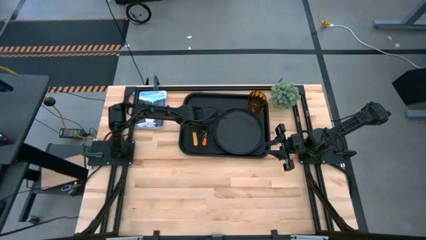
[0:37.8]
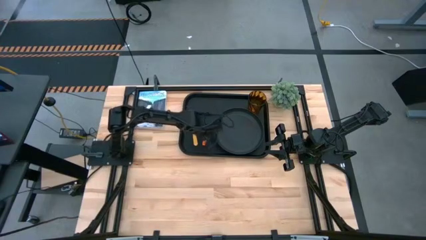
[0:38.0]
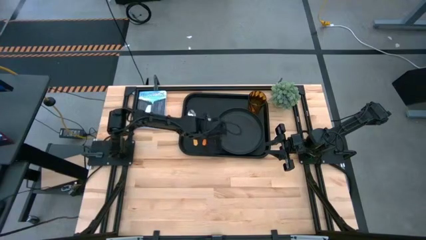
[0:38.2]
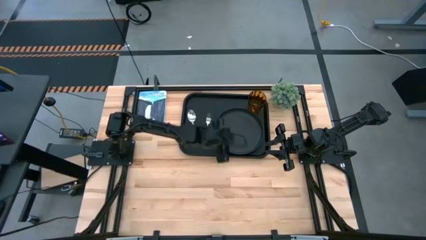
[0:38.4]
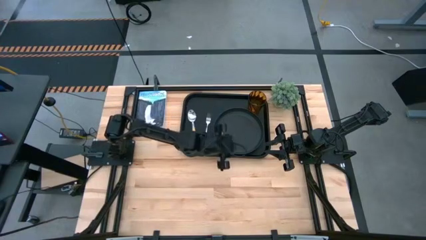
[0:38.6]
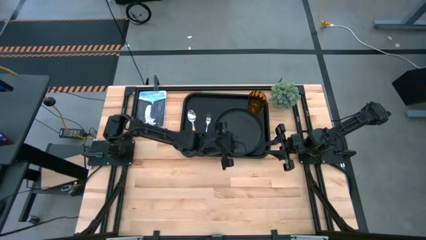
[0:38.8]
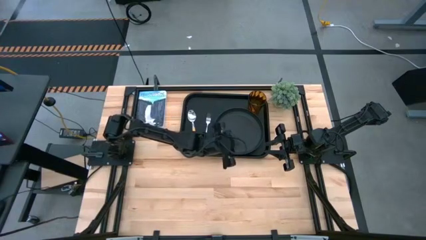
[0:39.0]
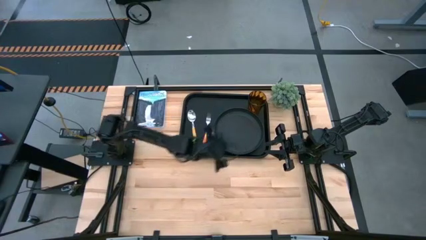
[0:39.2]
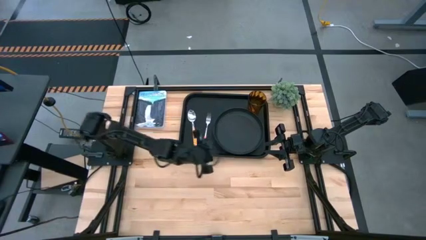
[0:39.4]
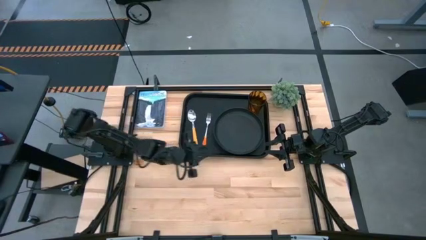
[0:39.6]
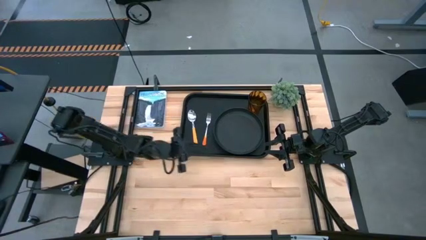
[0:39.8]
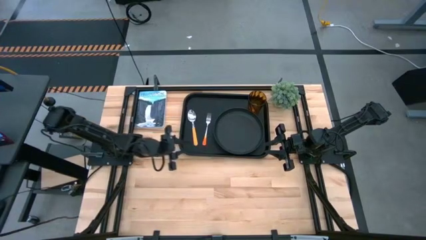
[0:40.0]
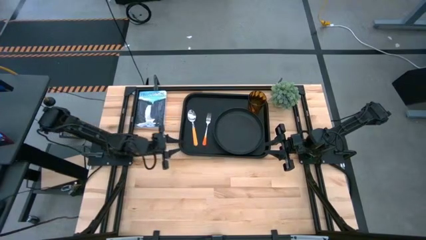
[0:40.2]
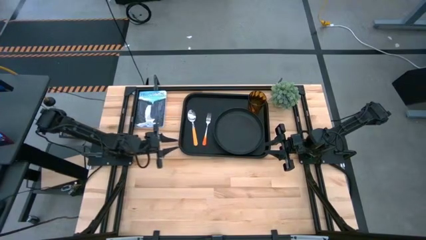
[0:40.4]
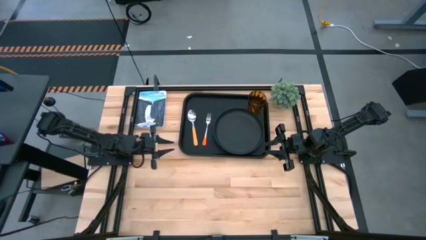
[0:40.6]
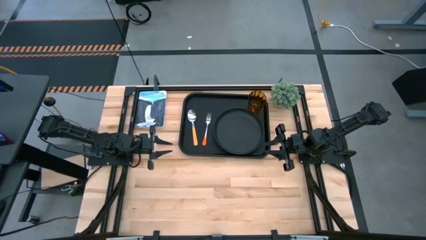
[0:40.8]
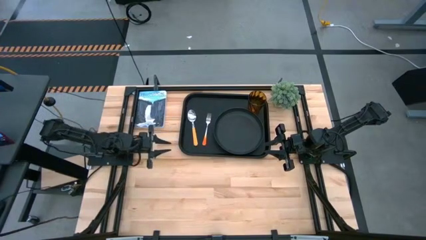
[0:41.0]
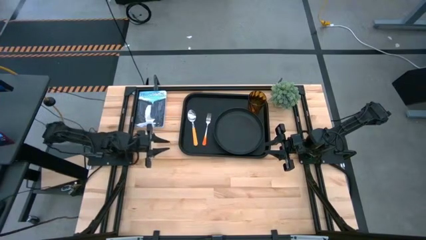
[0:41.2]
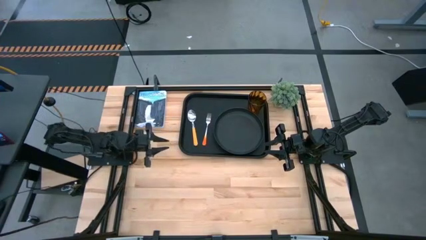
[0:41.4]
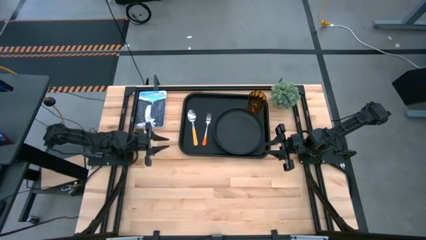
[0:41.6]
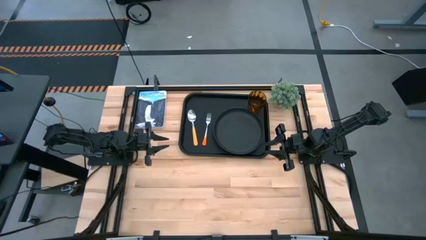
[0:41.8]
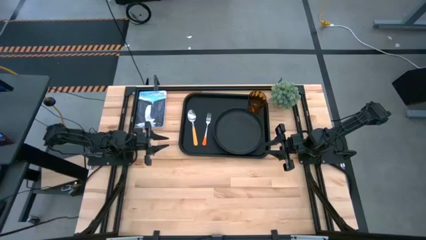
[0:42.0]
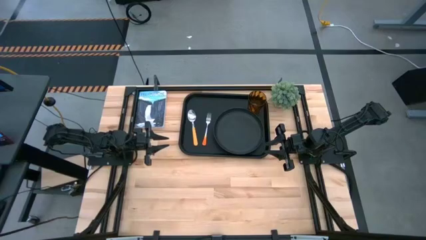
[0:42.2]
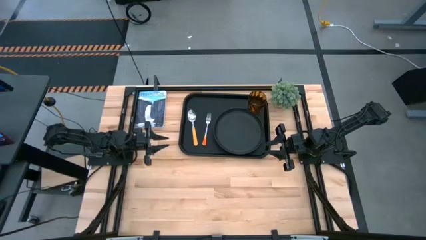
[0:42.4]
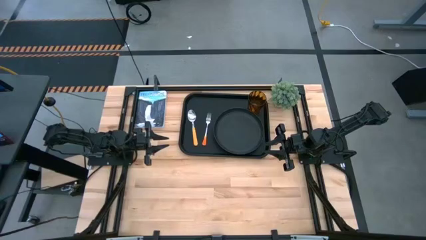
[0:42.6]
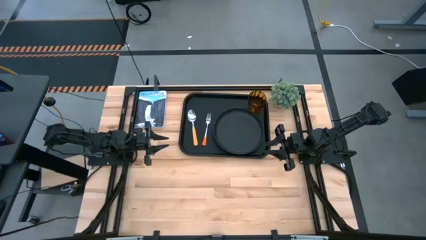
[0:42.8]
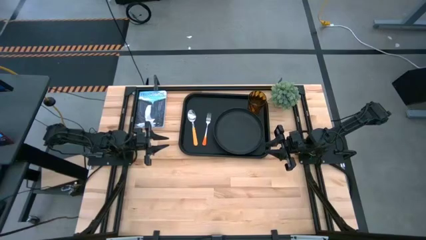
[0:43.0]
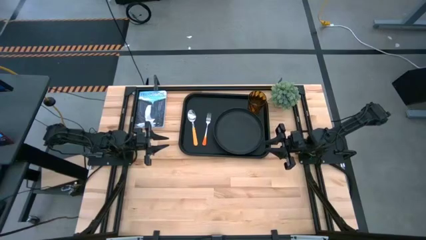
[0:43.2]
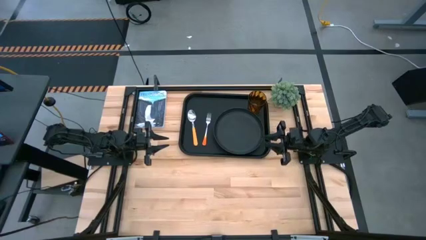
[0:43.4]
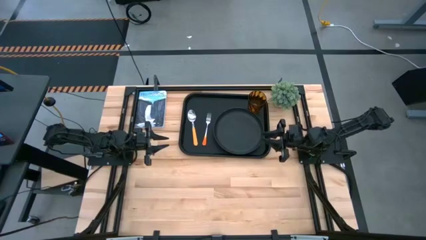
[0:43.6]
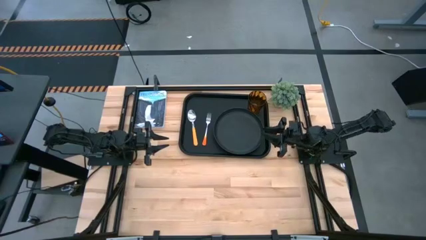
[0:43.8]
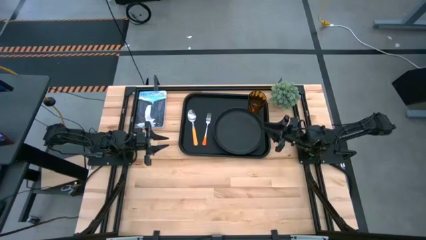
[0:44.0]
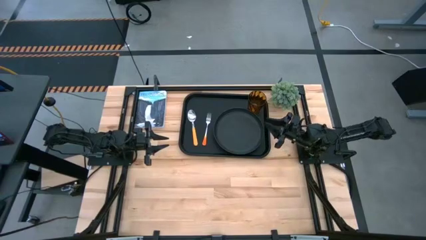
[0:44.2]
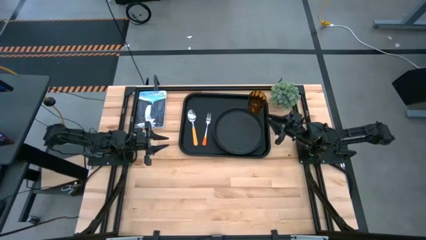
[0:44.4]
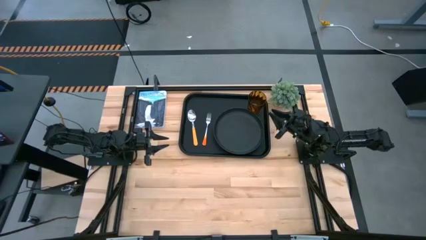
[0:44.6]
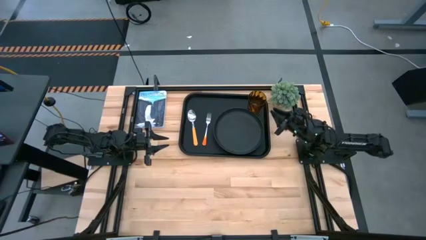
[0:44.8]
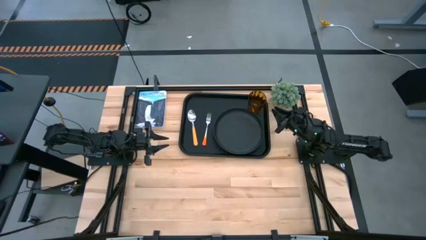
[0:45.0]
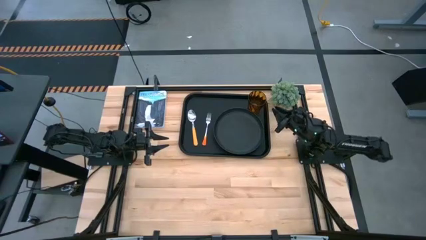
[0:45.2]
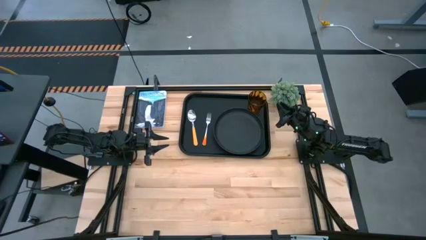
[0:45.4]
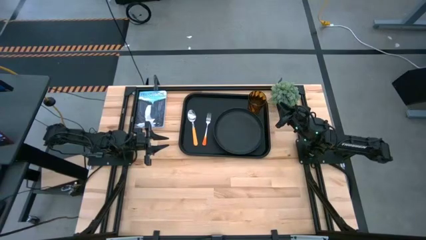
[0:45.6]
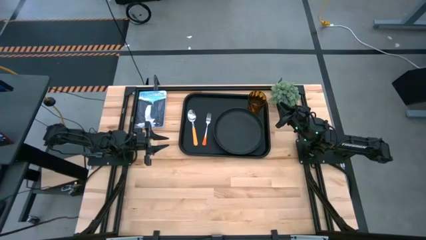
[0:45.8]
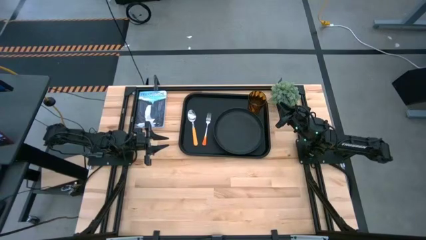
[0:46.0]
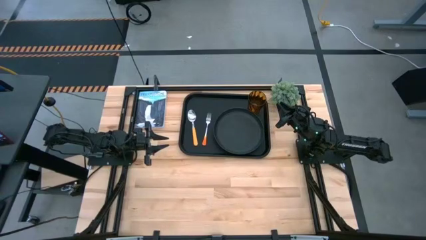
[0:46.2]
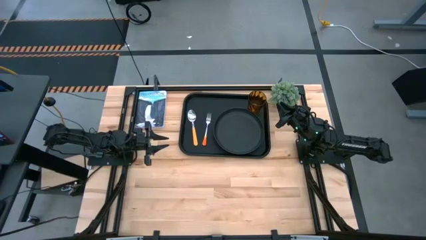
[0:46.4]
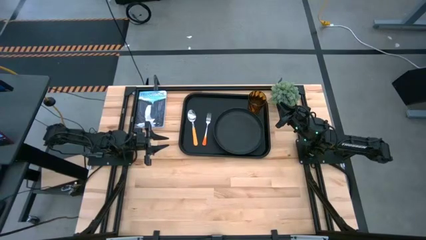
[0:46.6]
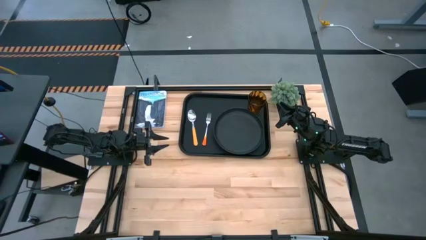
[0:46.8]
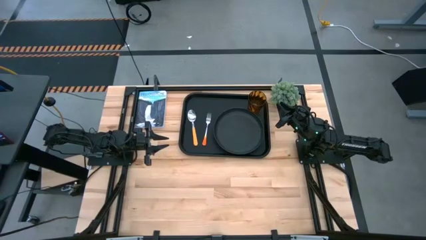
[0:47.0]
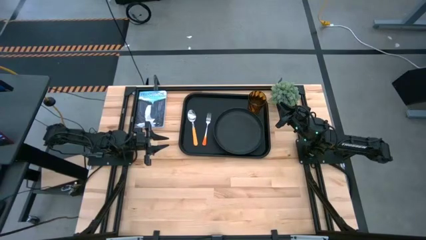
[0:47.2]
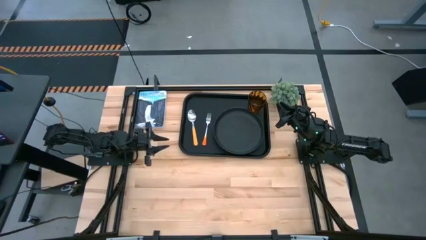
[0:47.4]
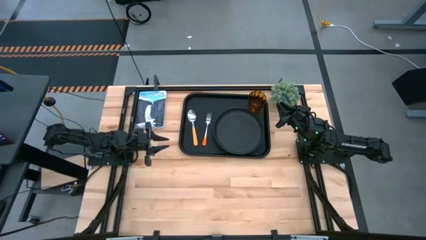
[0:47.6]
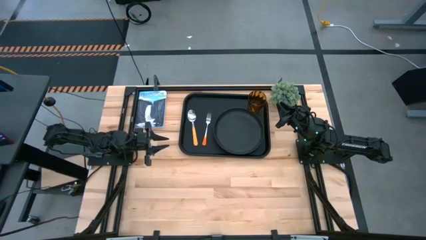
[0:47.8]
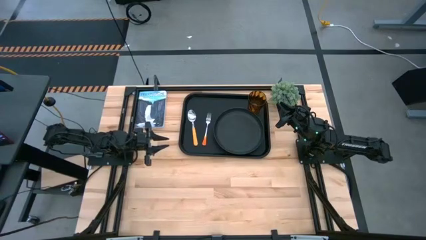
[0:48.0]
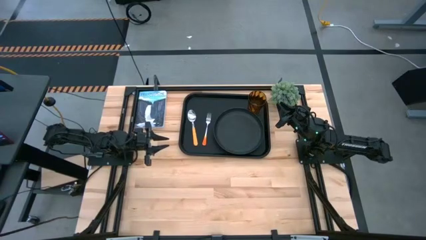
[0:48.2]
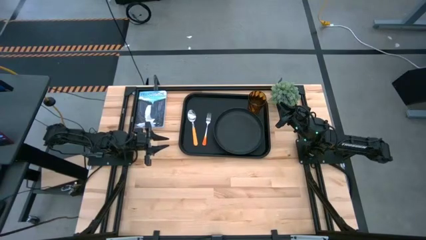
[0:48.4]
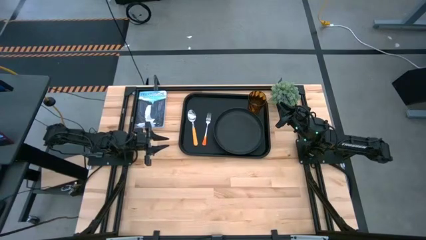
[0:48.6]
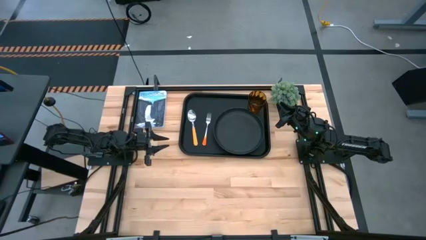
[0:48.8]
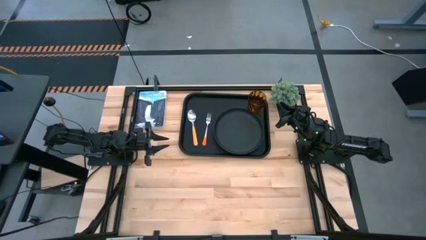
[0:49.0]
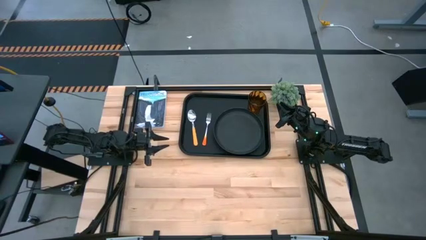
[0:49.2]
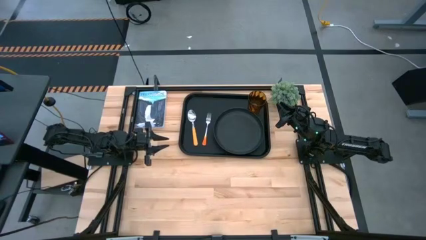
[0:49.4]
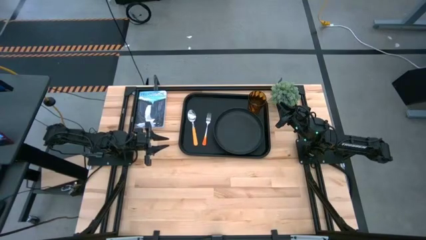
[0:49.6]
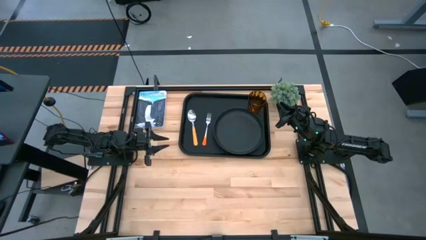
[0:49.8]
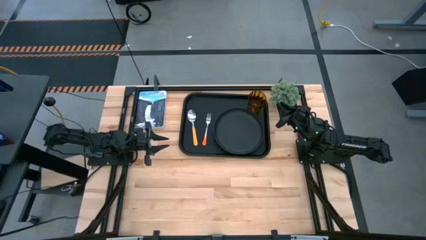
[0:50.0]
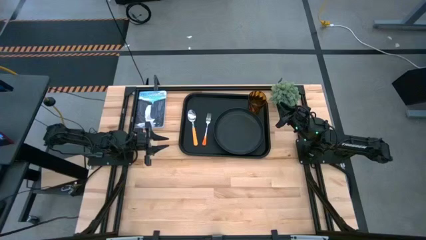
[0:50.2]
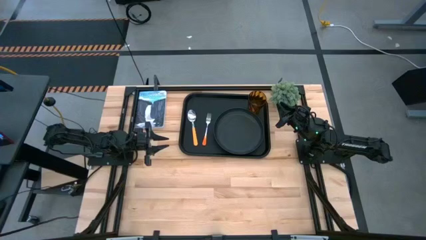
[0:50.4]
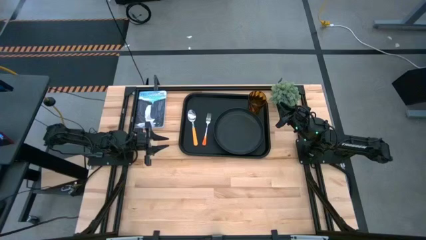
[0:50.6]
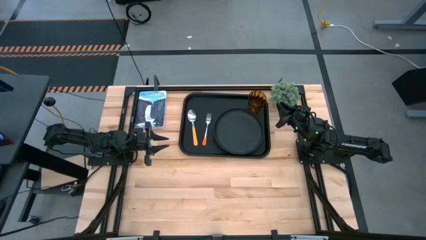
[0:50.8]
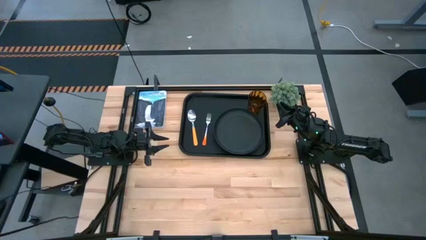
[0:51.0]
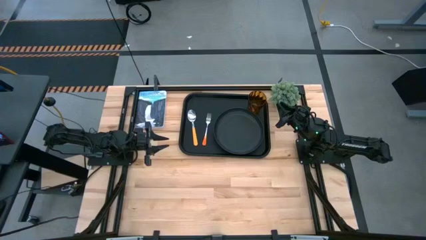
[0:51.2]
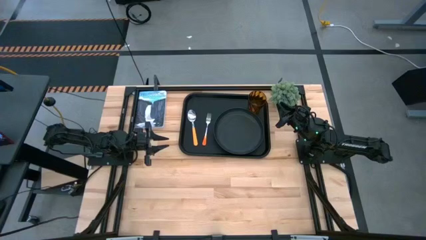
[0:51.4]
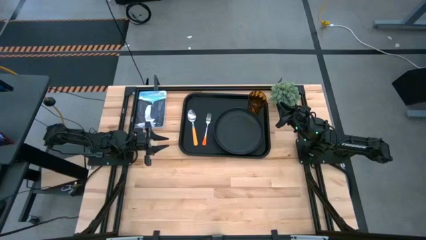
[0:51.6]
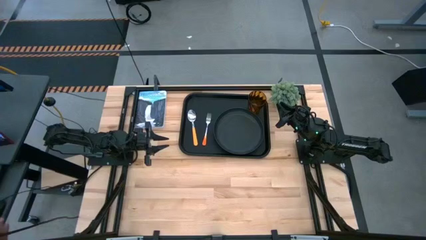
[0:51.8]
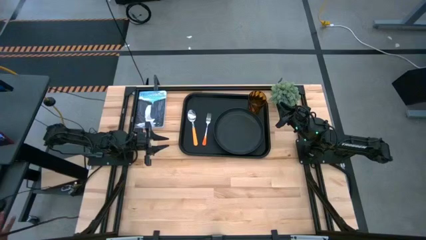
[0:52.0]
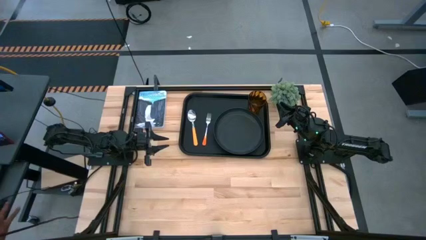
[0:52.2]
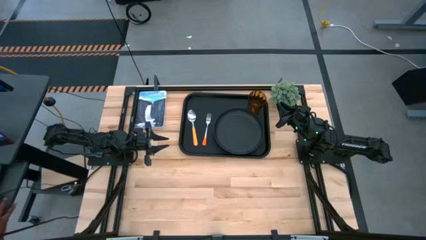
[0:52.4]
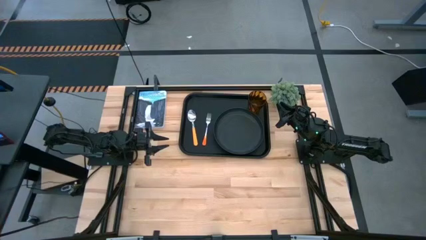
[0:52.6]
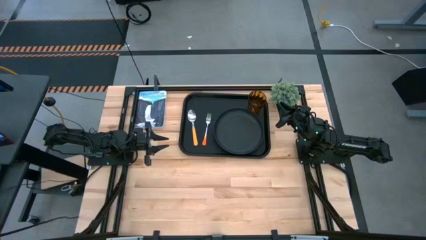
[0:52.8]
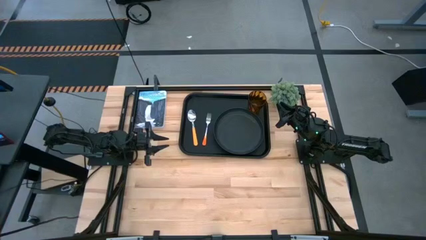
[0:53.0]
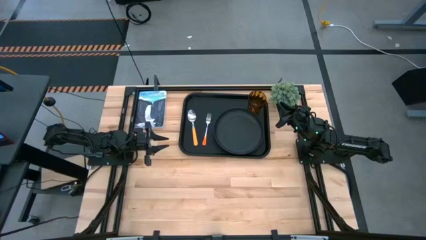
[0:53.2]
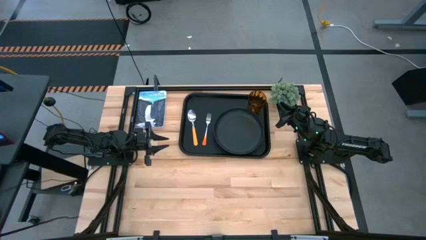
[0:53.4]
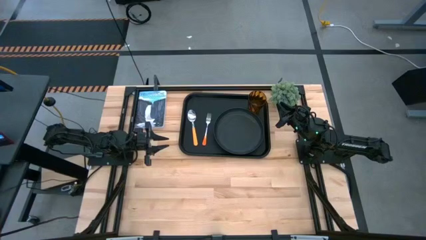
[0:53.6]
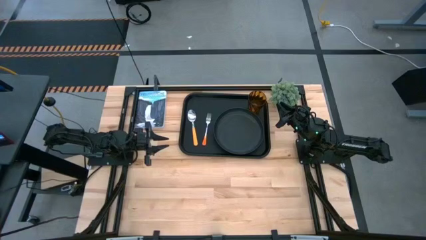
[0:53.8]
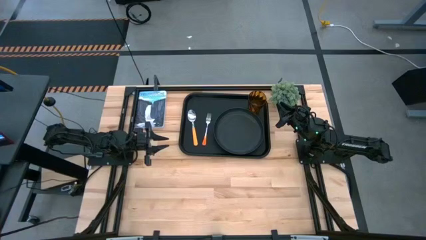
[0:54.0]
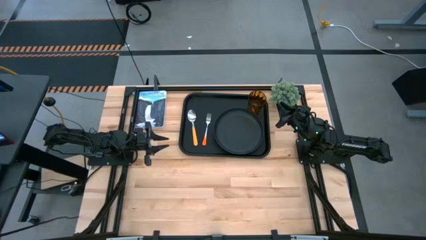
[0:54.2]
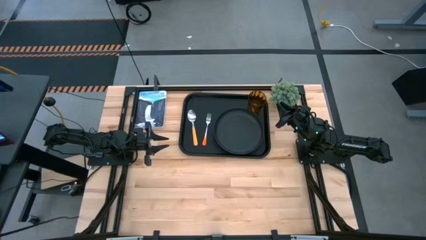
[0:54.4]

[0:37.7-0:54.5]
Task: Pick and place plate/cup/fork/spoon on tray
Return to Home Position
